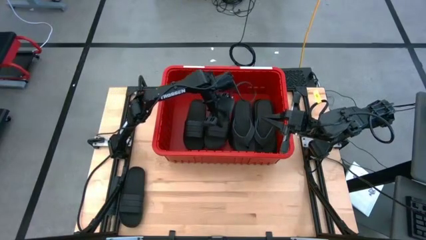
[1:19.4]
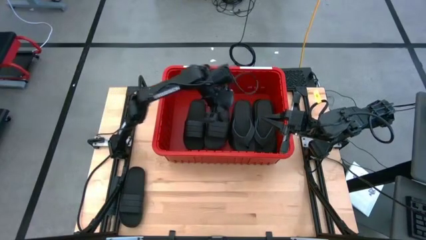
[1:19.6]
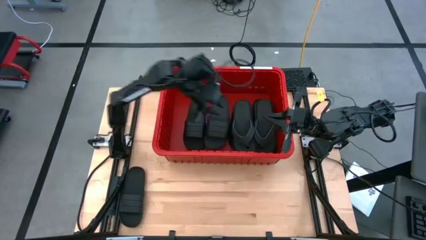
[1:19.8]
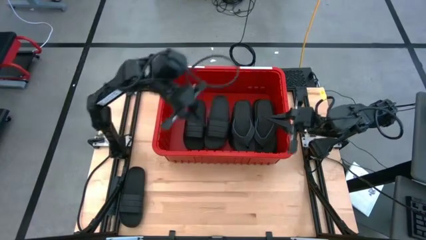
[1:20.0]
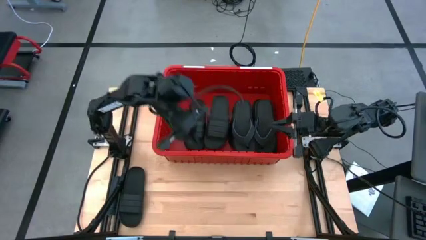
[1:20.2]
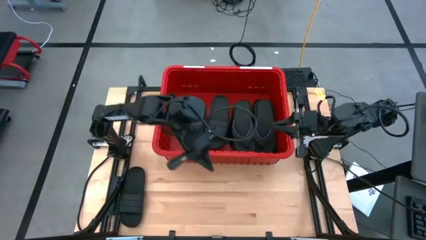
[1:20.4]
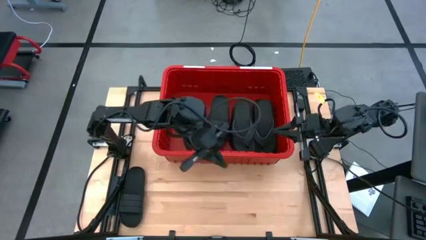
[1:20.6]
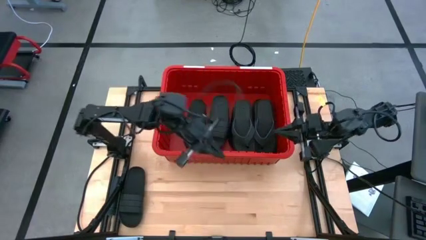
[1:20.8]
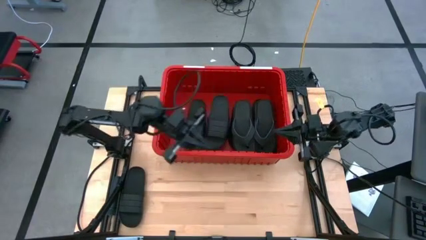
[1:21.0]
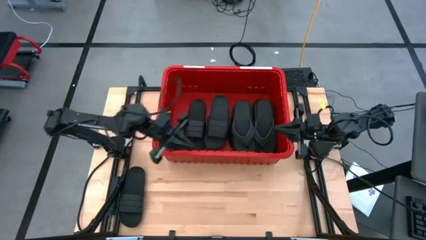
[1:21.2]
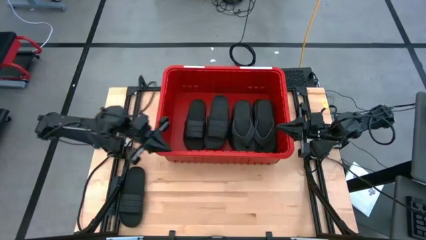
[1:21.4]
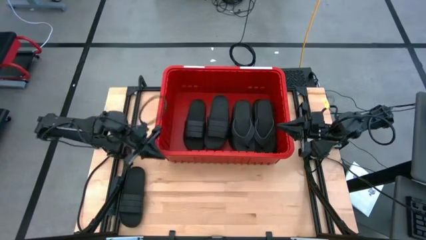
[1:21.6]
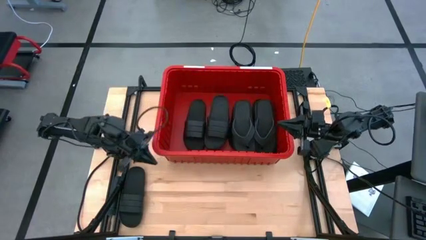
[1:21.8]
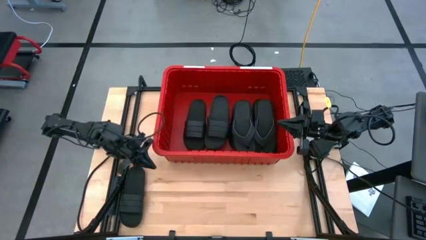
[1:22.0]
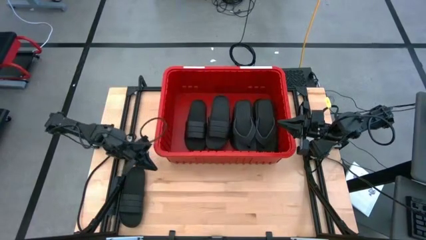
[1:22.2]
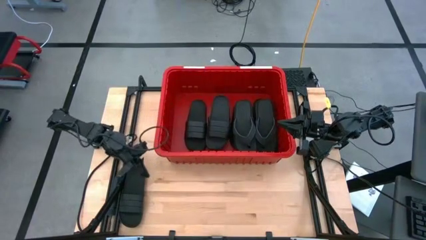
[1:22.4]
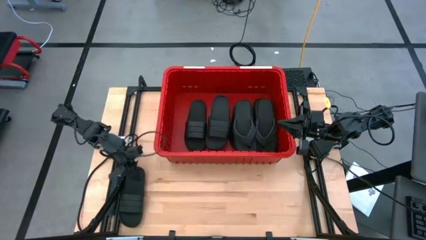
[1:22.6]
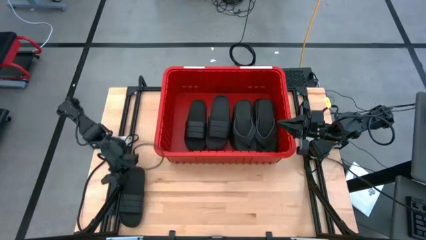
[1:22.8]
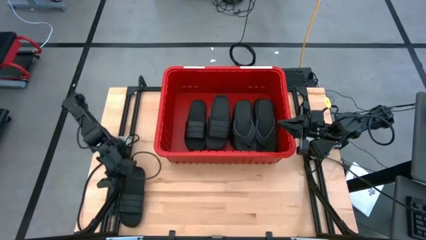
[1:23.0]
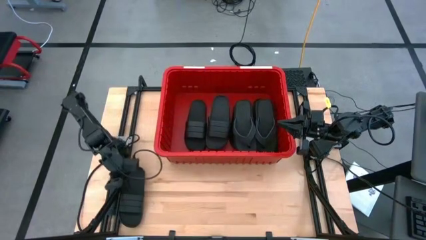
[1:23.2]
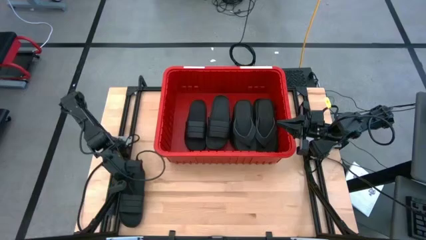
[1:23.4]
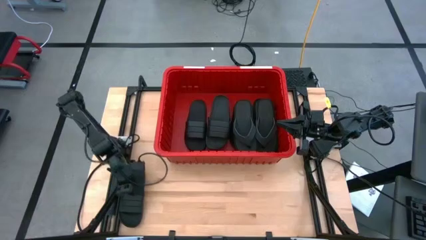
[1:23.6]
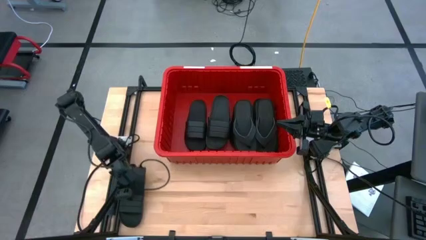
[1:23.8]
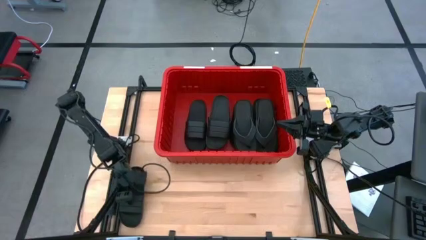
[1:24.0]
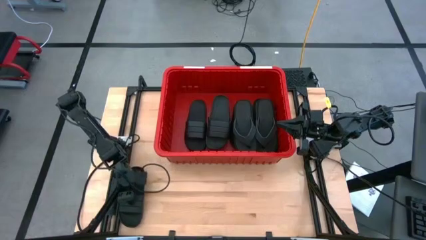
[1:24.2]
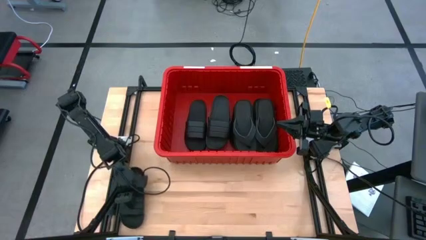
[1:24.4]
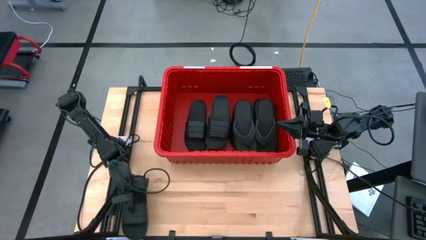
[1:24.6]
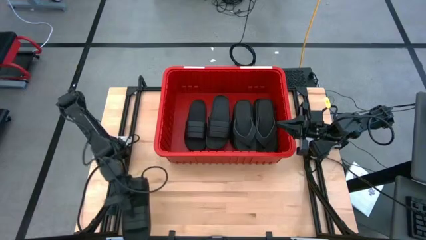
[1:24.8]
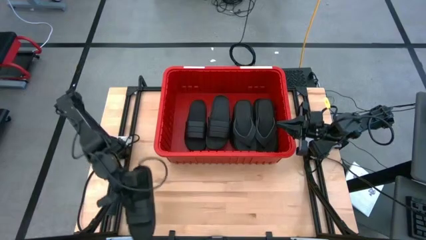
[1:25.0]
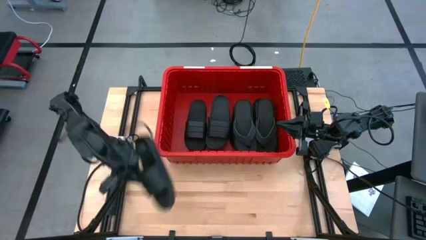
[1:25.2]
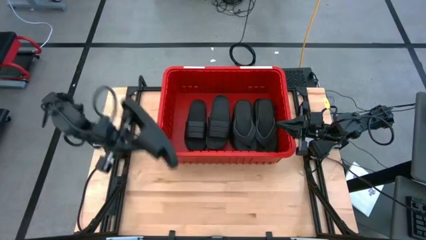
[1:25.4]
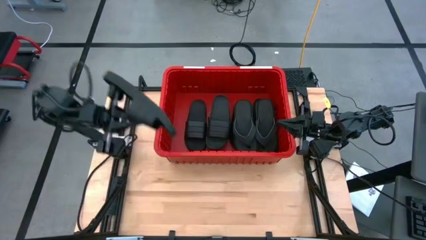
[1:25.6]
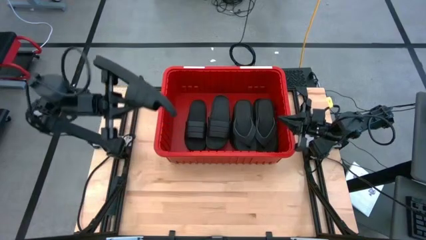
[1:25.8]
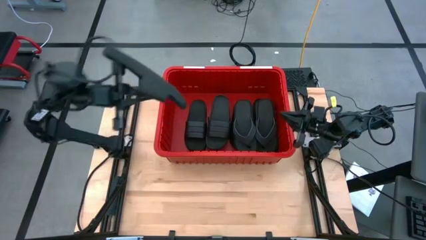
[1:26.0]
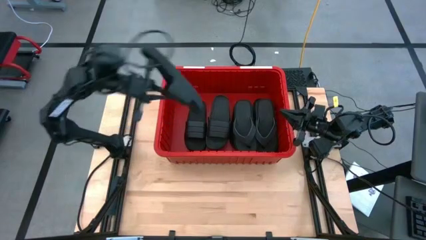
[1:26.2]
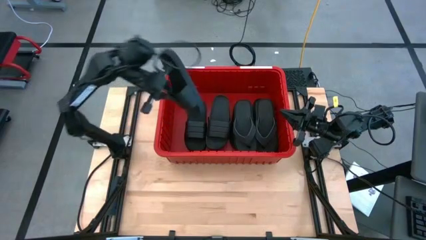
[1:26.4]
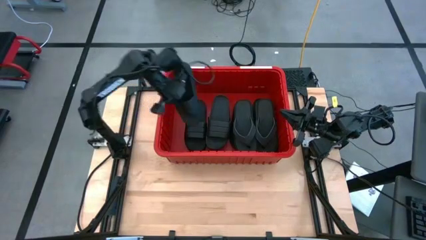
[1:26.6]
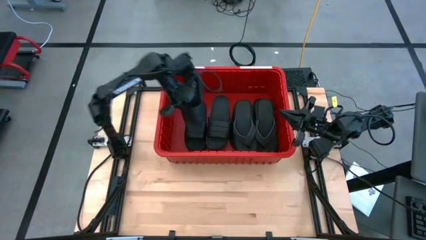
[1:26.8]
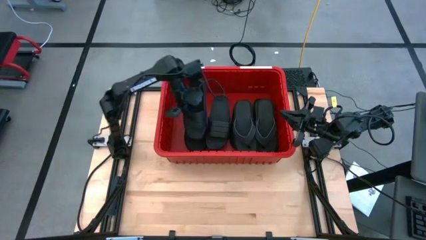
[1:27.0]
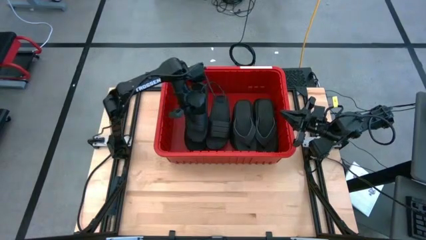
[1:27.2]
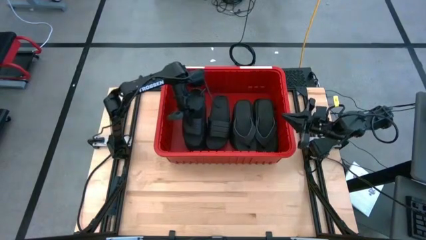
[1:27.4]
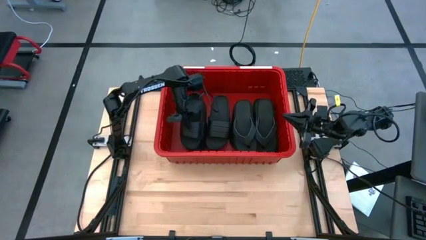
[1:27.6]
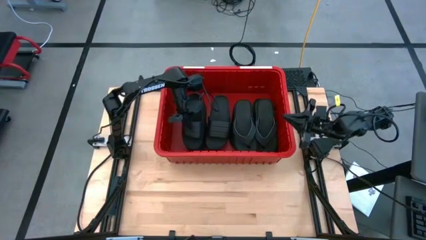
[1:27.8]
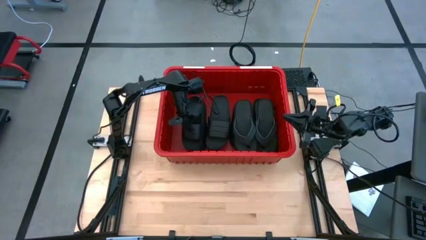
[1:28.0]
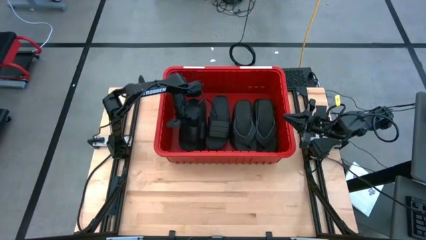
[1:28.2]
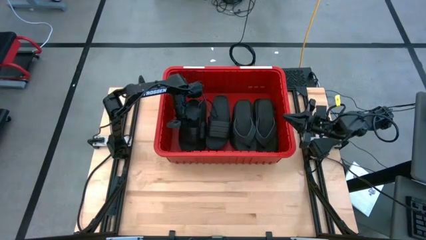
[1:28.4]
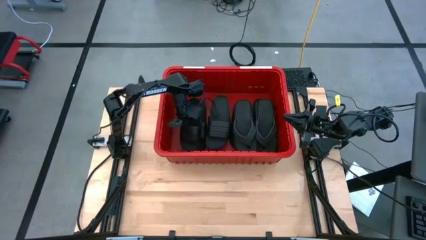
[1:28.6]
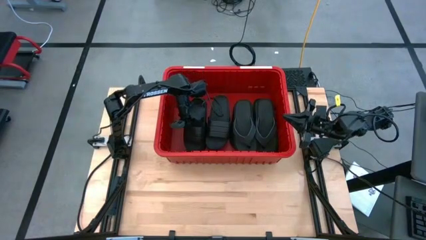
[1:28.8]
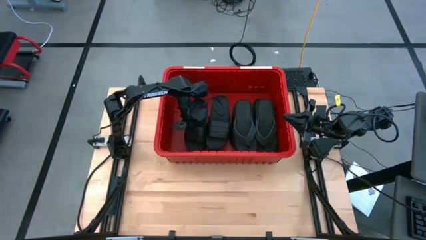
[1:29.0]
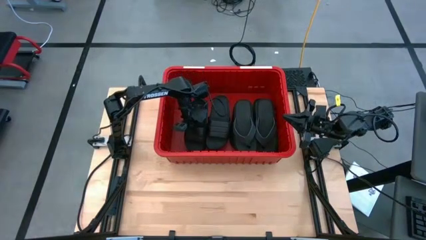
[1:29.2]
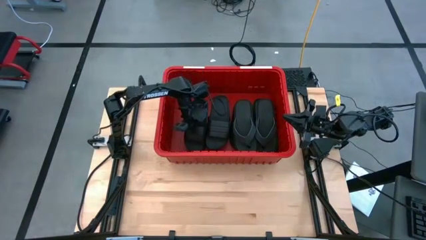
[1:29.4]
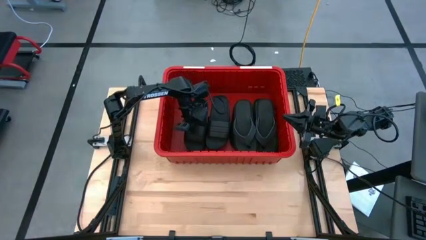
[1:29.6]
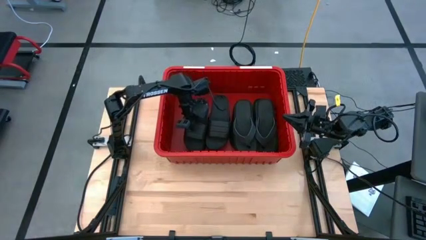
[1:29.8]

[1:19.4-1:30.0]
Task: Pick and place slides into bin
Put the slipper into the bin

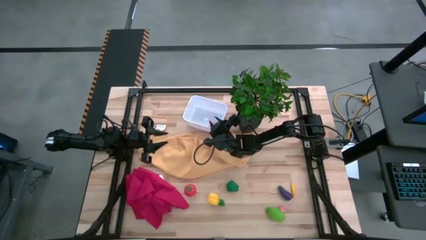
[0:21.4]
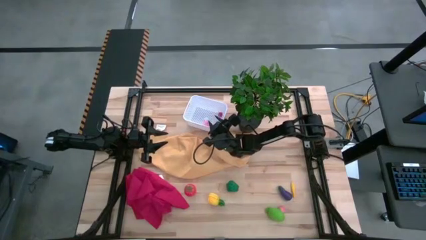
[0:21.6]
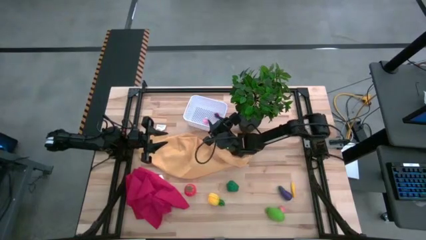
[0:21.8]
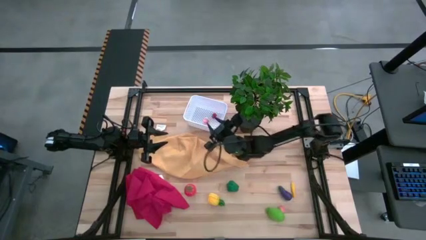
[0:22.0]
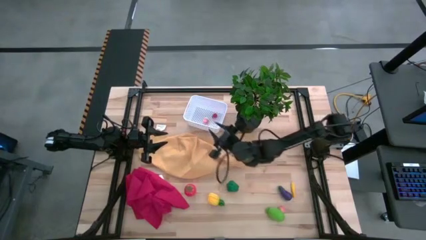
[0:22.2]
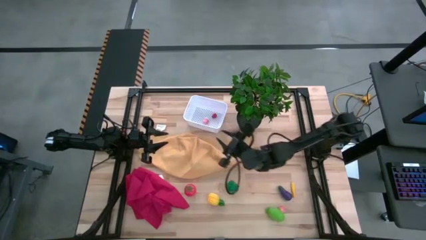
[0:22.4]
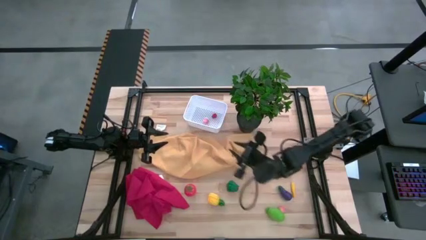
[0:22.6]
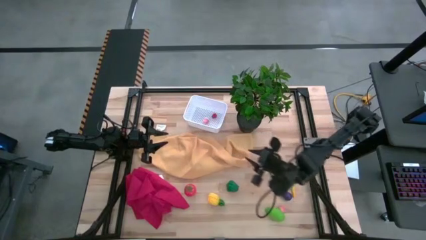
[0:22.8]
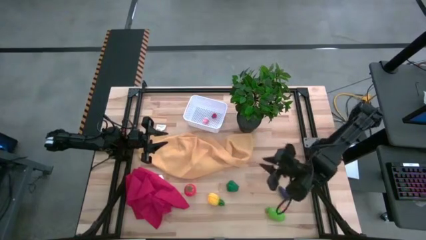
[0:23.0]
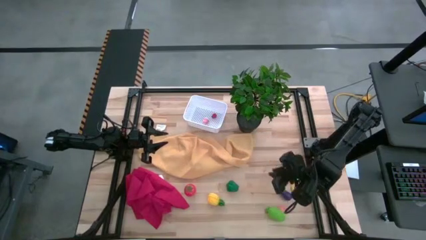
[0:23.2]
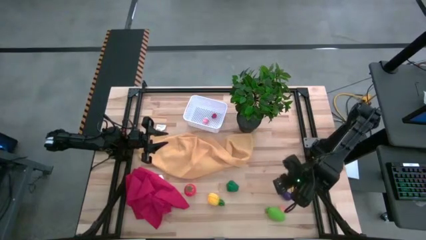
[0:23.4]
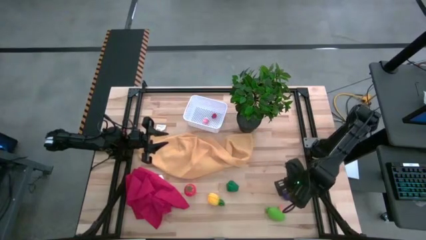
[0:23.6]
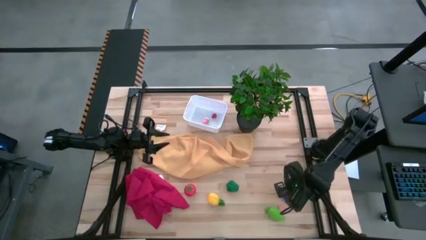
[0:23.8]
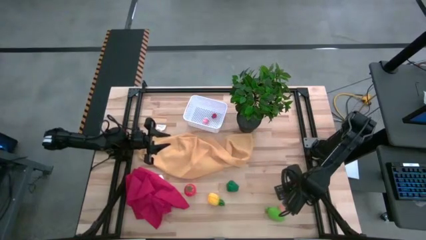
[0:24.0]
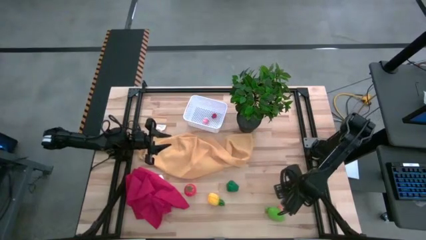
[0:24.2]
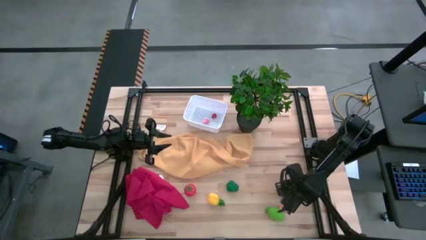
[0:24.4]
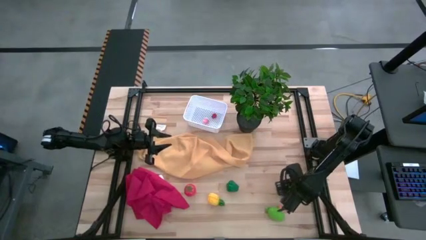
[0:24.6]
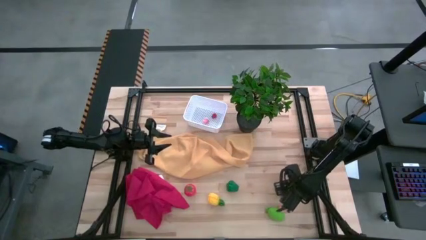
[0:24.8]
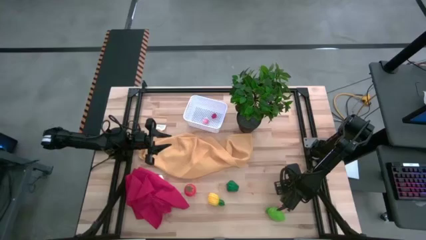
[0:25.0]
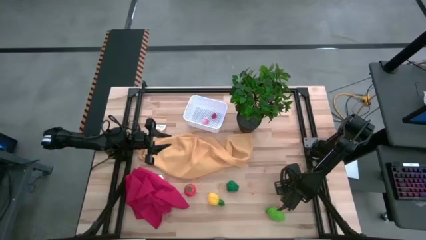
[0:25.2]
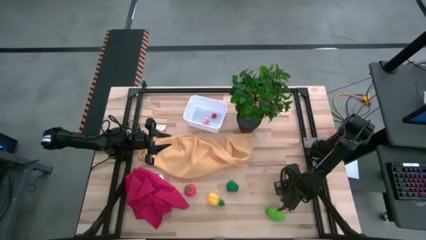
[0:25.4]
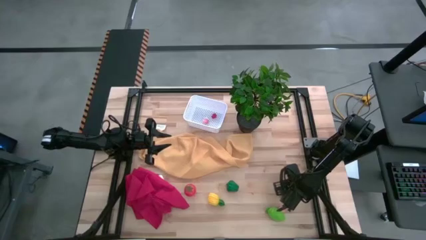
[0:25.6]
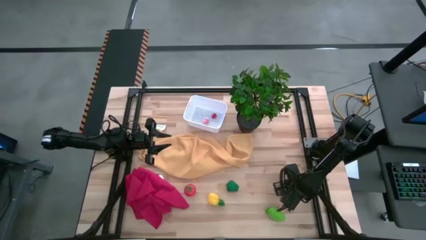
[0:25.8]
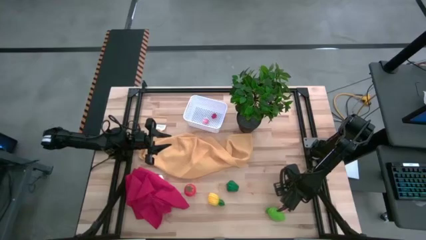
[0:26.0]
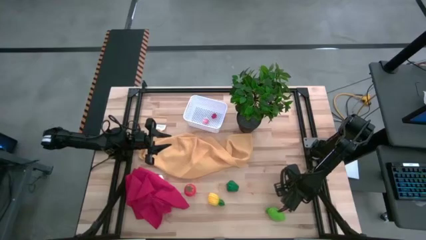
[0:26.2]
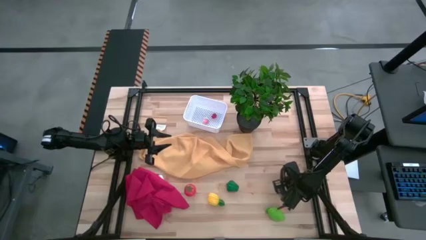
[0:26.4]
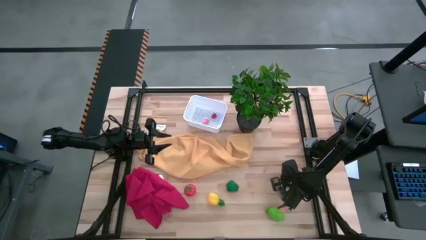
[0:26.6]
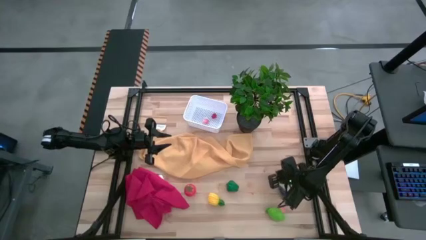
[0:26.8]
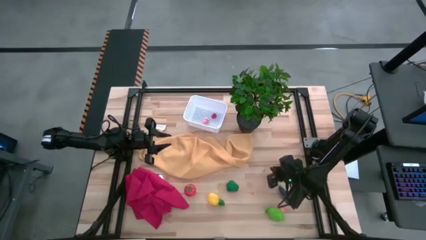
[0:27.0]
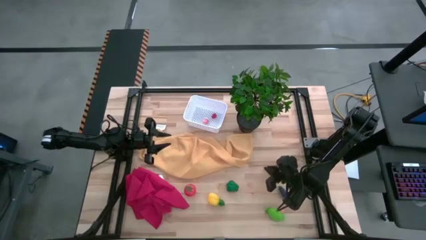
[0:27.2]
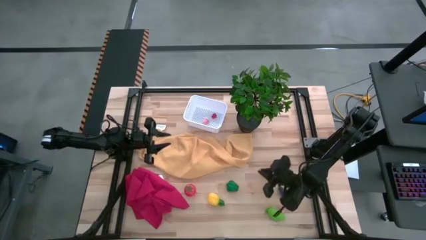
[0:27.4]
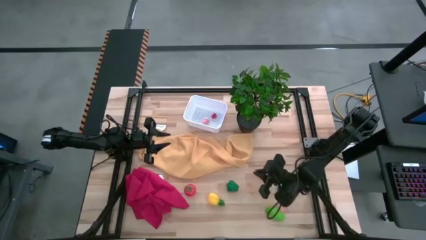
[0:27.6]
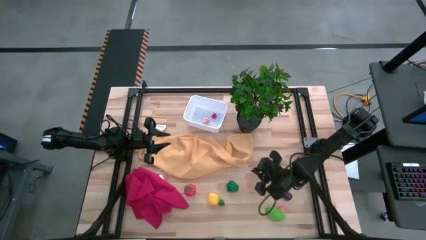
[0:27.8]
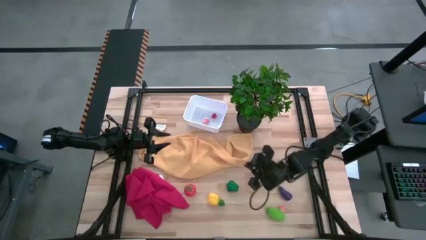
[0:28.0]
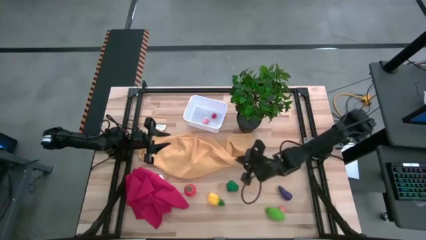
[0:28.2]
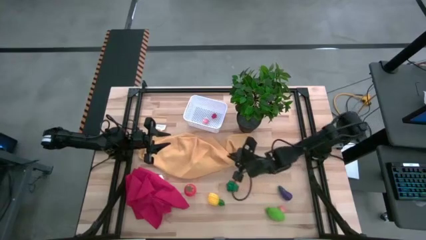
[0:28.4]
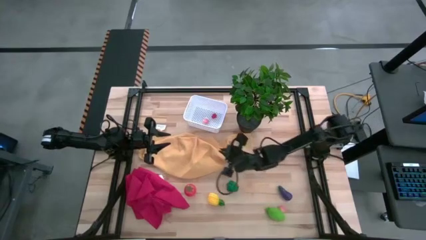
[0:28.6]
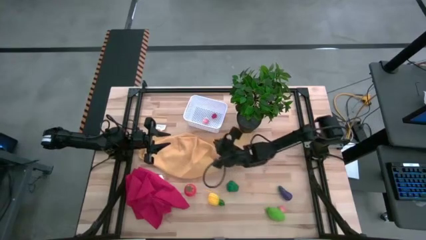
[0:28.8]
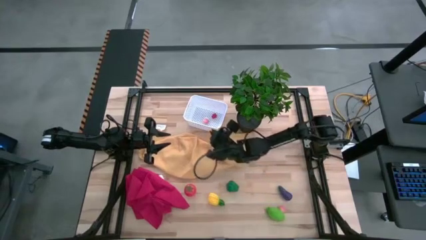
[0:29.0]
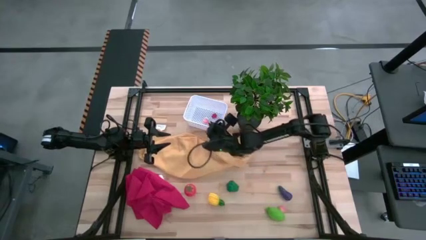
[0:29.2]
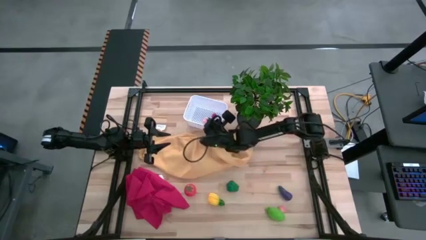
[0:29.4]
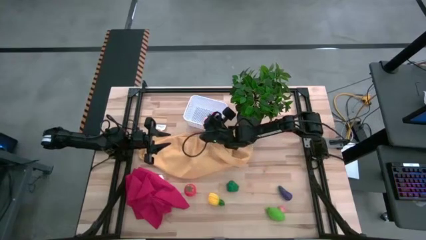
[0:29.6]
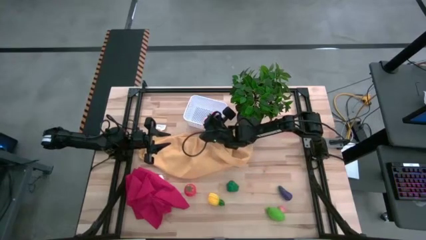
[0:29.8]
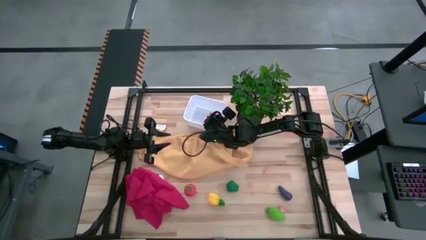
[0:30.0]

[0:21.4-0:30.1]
Task: Pick and placing Produce into tupperware
Put the yellow corn into the white bin
